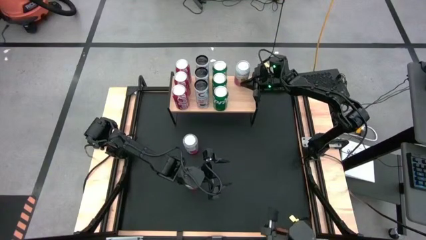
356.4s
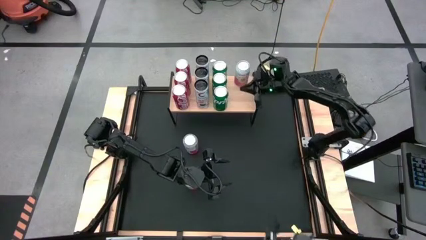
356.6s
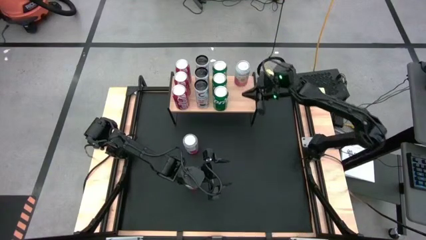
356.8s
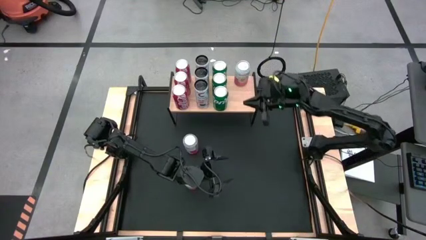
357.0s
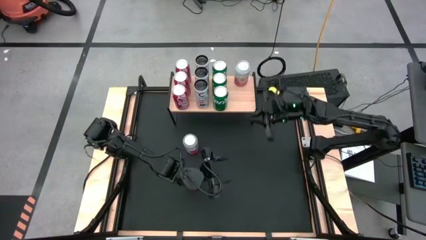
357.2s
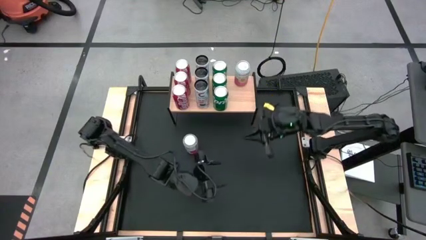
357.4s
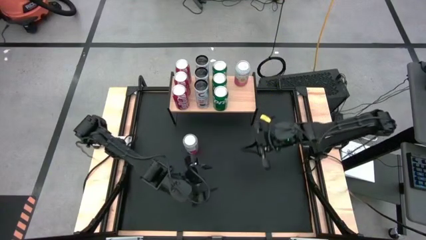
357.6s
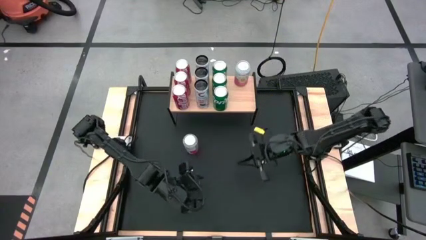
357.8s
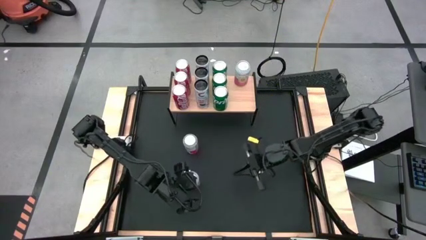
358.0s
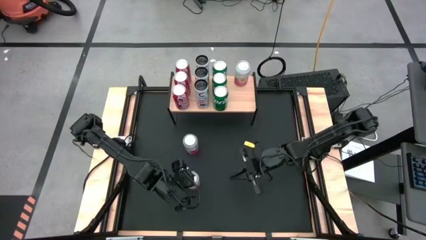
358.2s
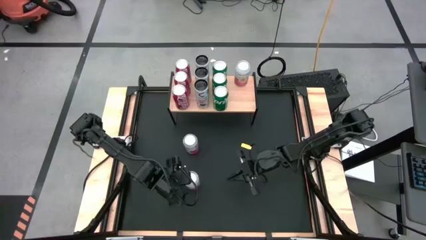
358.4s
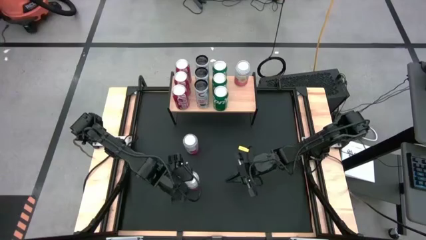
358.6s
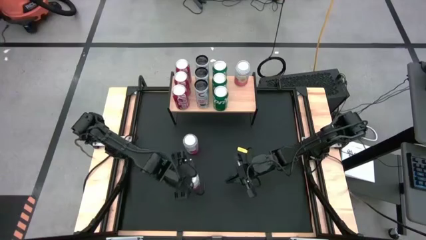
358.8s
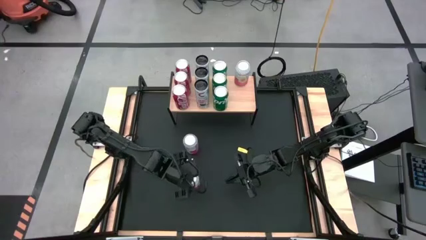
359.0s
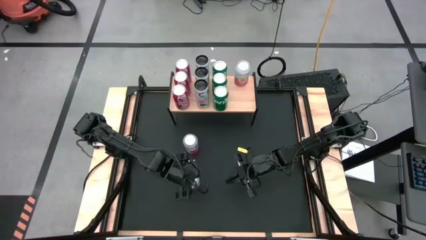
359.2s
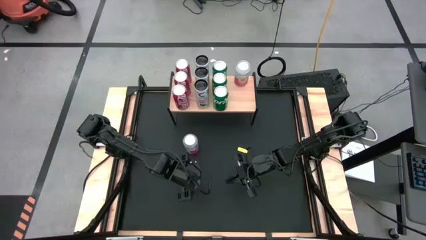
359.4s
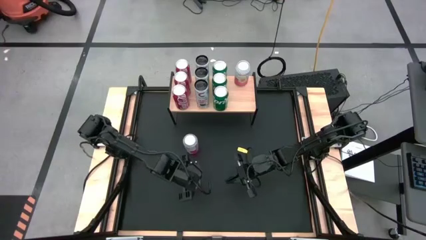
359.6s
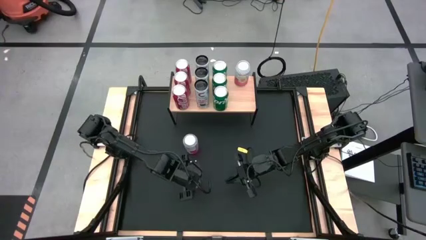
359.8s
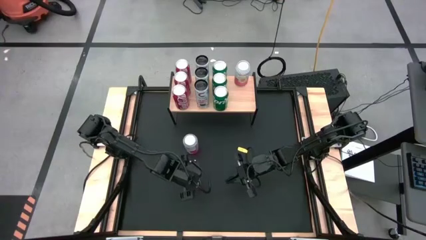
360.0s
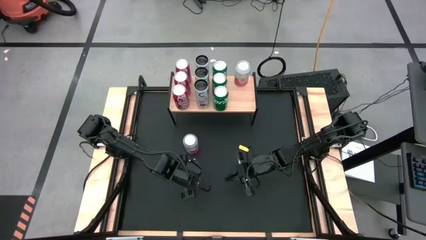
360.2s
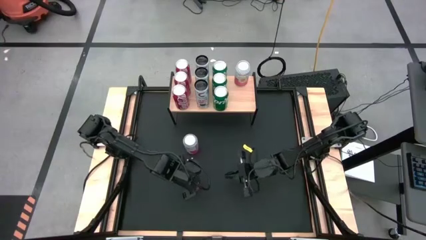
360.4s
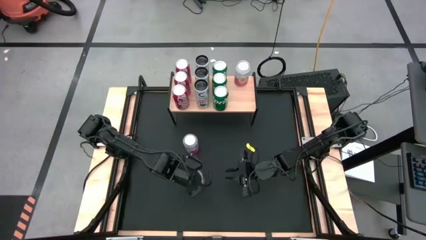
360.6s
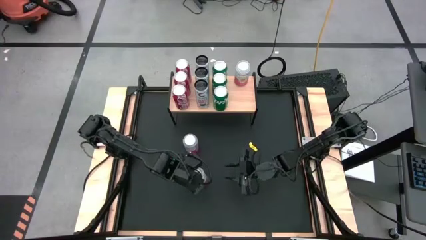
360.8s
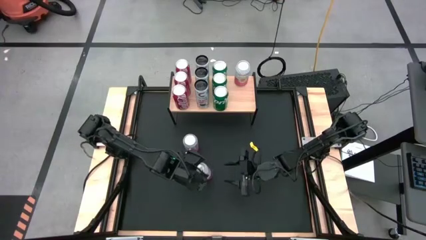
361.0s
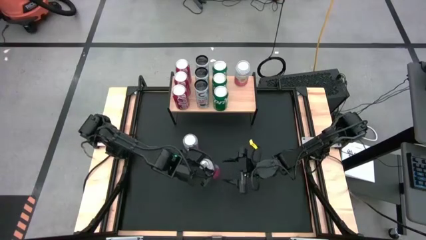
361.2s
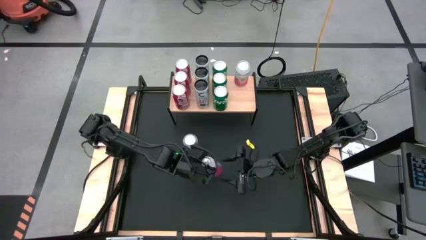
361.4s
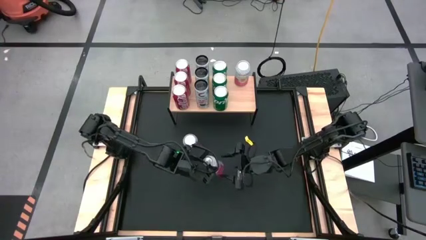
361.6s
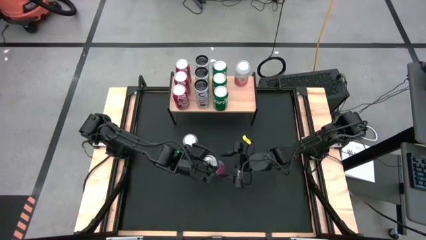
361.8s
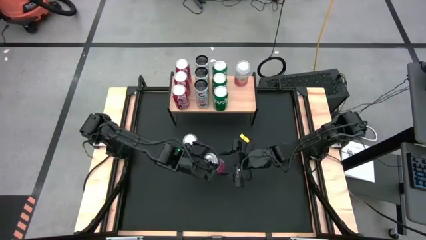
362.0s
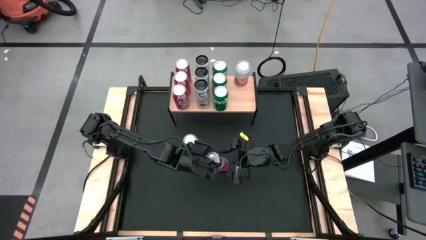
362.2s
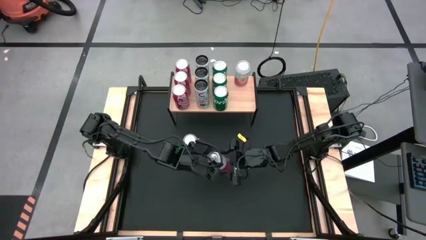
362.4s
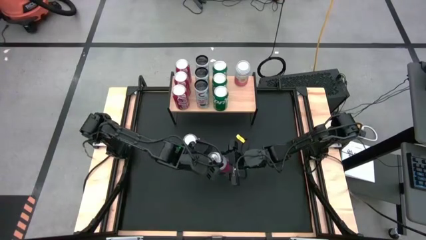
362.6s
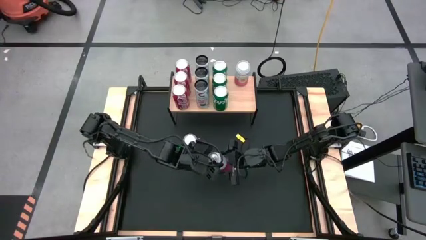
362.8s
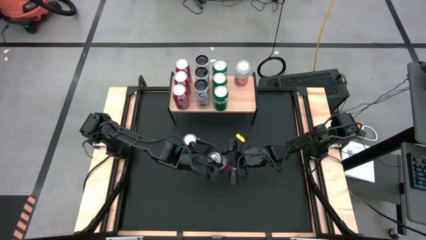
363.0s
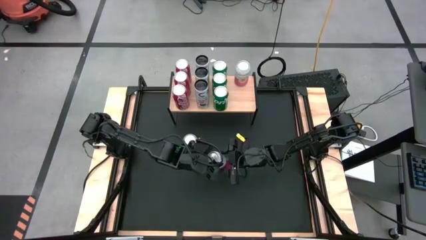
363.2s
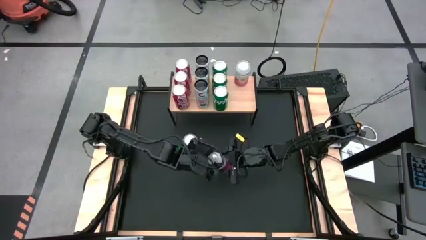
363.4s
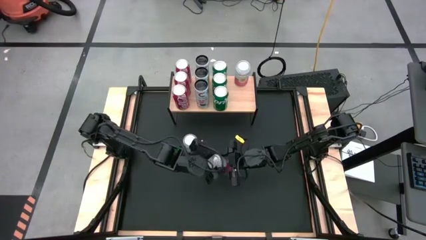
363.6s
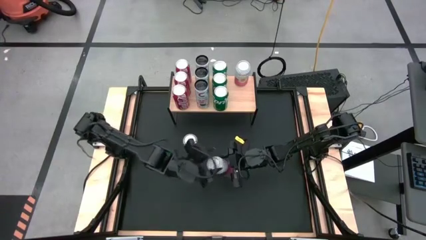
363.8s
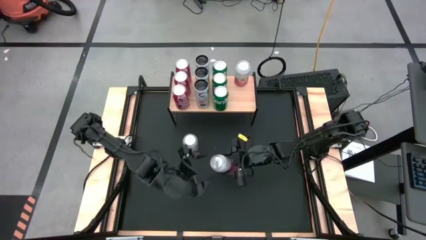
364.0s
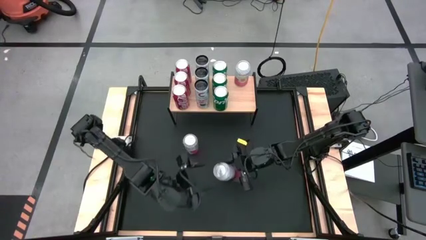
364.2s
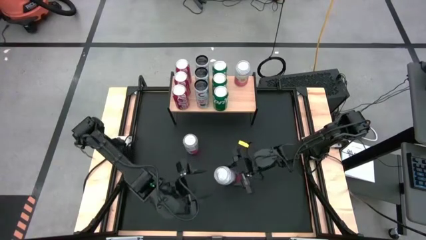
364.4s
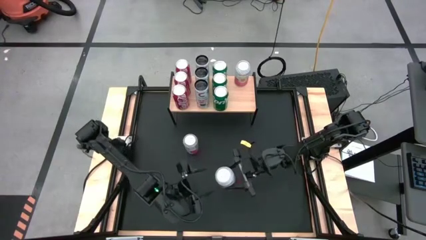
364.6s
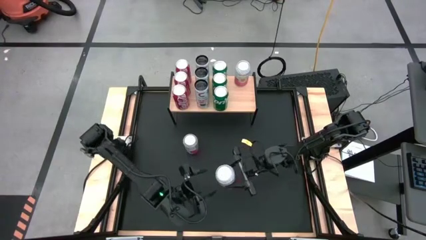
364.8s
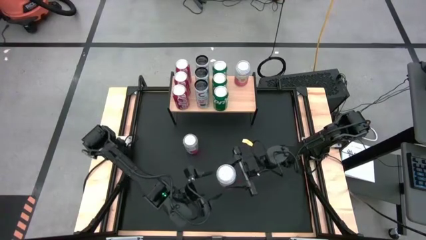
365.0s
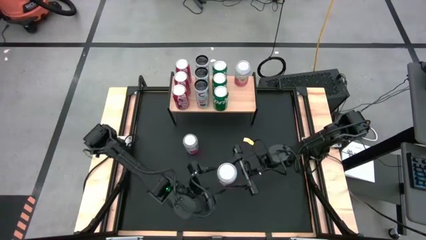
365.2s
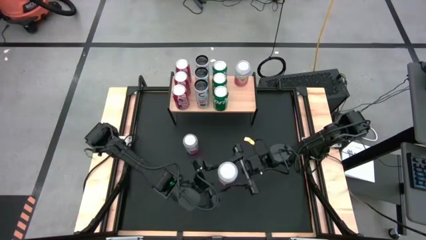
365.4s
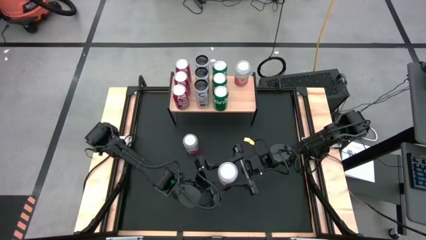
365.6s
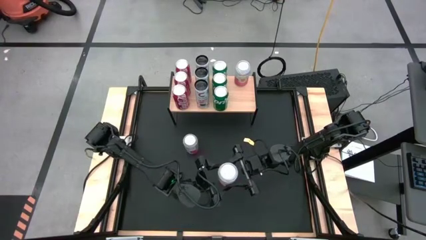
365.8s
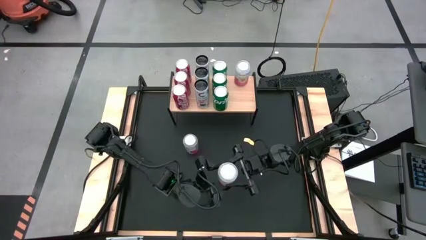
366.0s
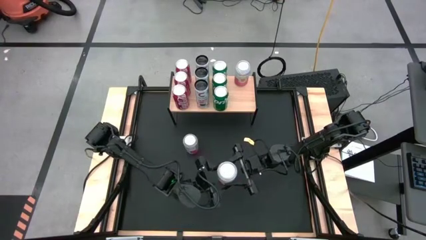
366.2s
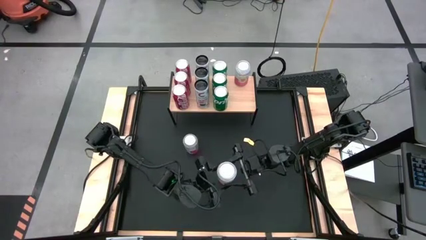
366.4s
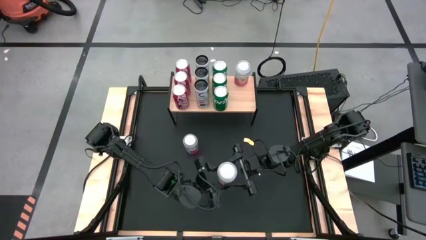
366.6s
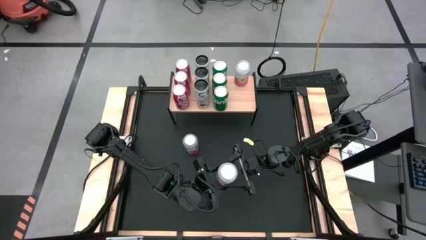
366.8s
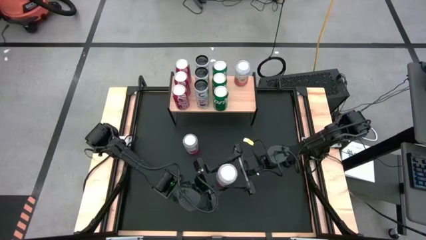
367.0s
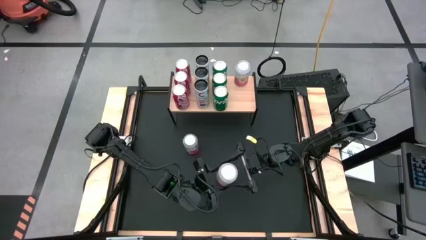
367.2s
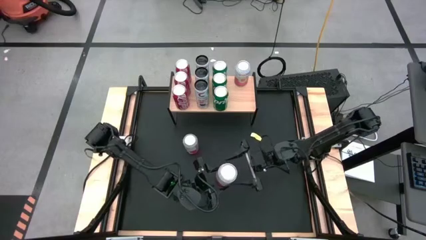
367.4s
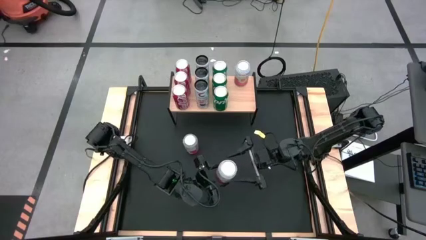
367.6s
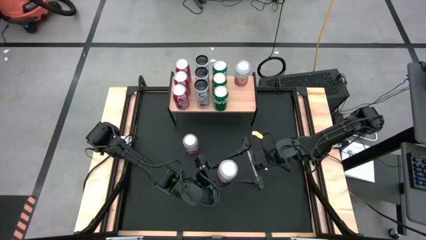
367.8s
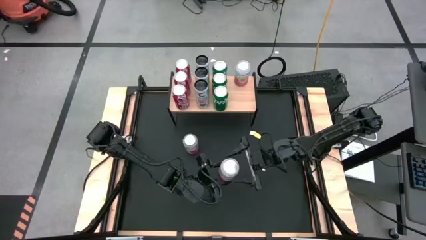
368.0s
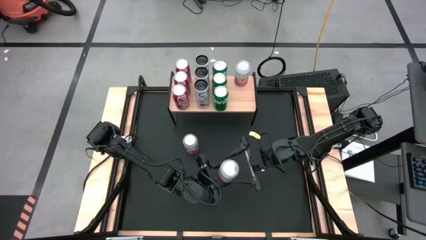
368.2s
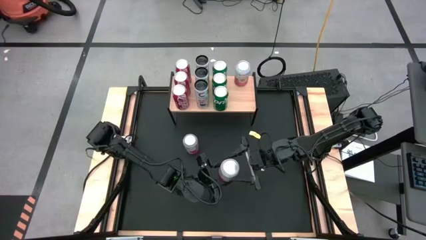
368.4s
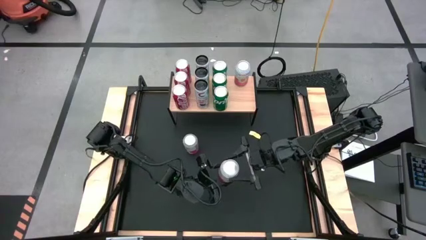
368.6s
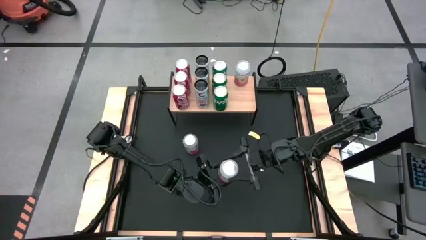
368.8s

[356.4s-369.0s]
Task: Place canned beverage on shelf
Put the bottom pink soda can aligned with the other pink soda can on the shelf
